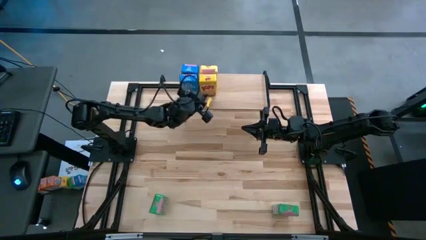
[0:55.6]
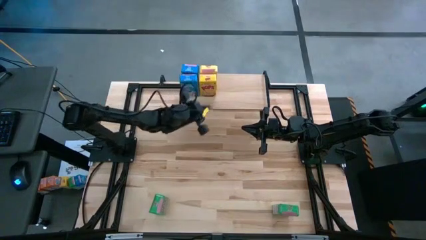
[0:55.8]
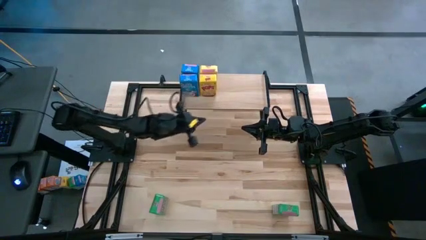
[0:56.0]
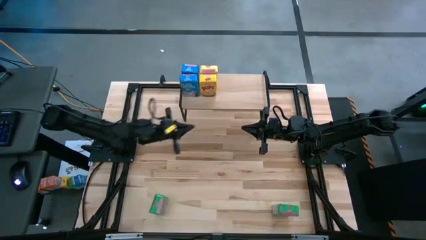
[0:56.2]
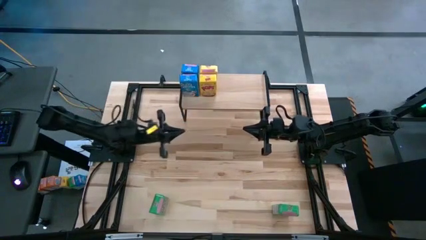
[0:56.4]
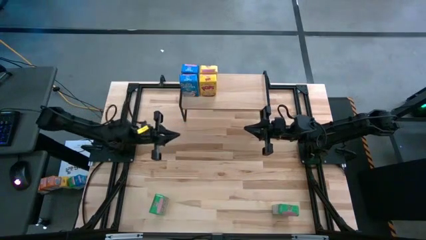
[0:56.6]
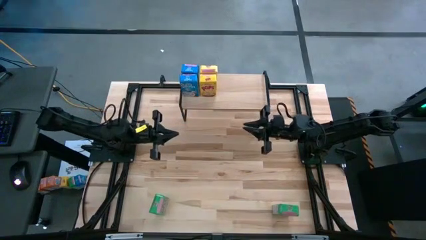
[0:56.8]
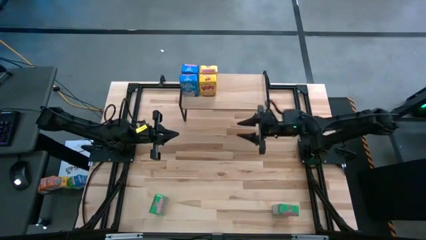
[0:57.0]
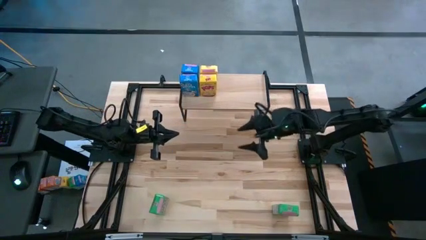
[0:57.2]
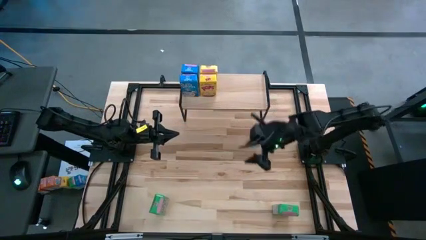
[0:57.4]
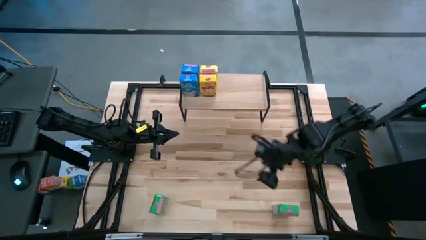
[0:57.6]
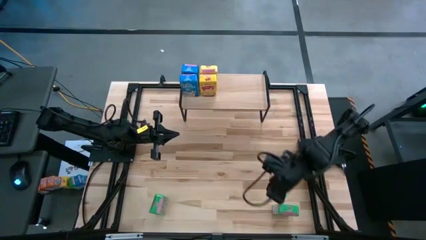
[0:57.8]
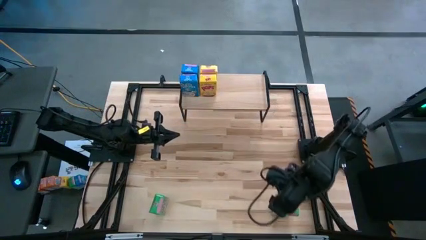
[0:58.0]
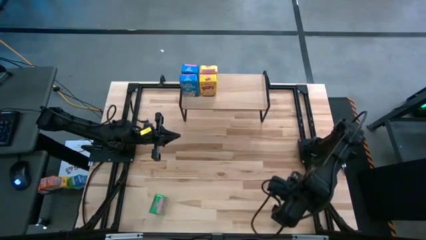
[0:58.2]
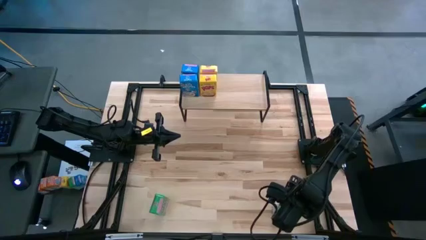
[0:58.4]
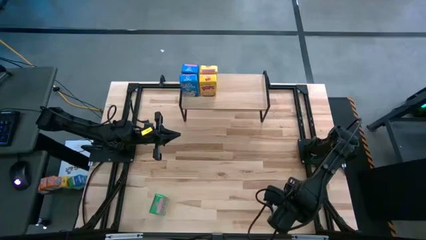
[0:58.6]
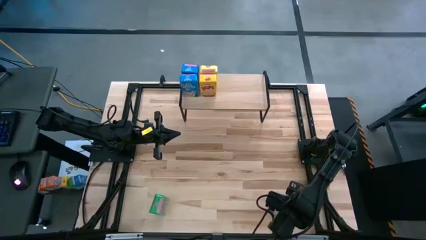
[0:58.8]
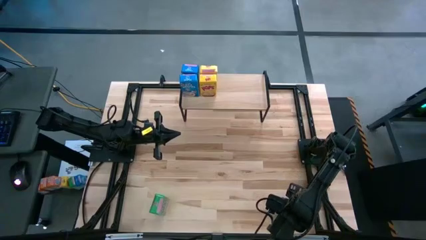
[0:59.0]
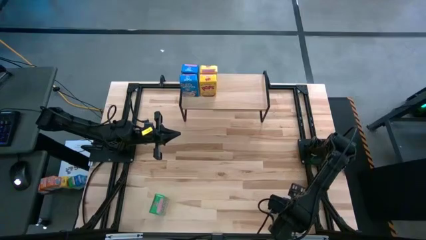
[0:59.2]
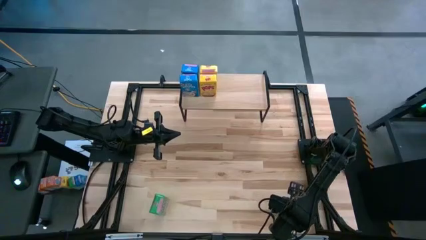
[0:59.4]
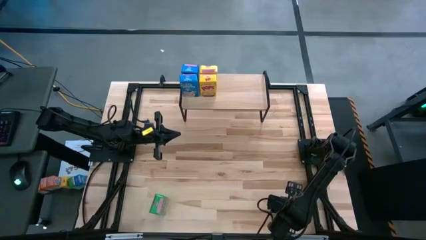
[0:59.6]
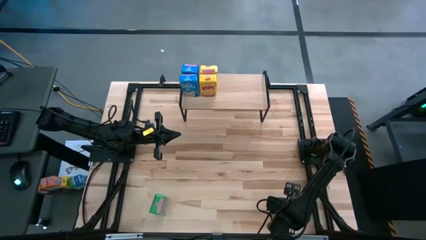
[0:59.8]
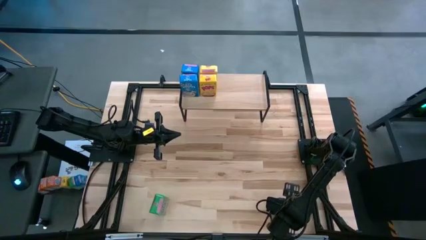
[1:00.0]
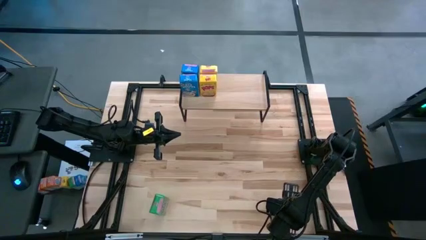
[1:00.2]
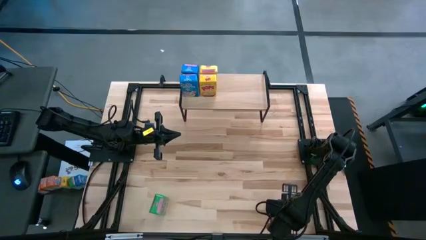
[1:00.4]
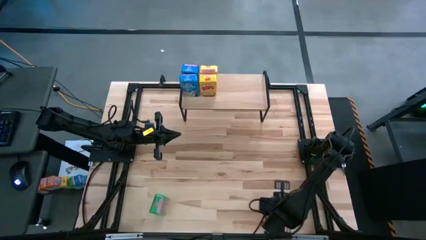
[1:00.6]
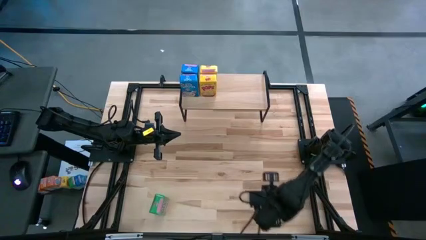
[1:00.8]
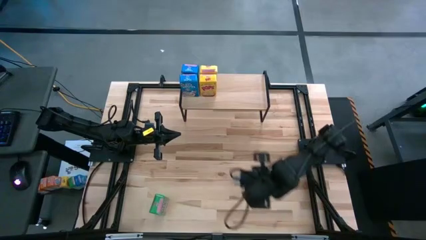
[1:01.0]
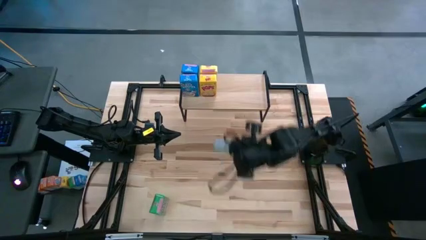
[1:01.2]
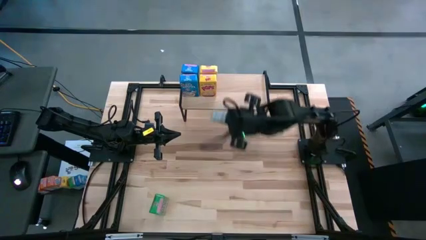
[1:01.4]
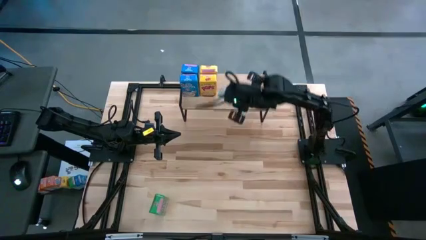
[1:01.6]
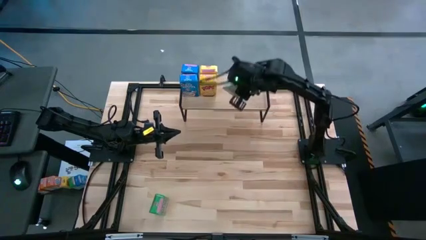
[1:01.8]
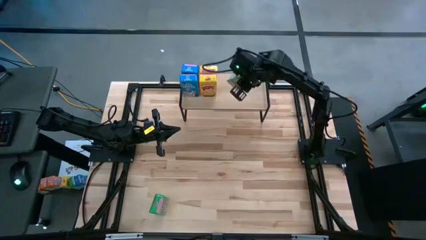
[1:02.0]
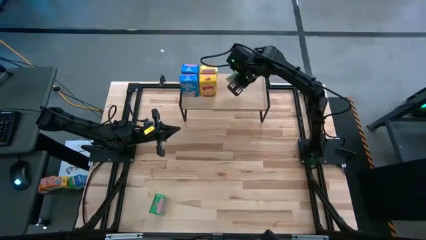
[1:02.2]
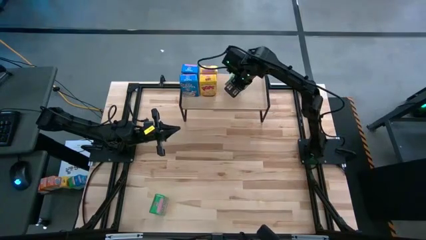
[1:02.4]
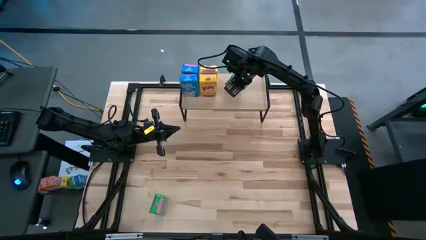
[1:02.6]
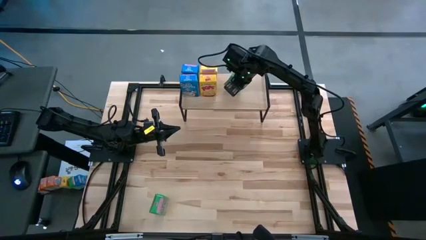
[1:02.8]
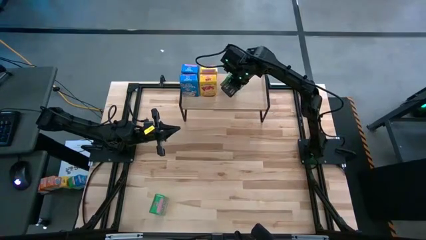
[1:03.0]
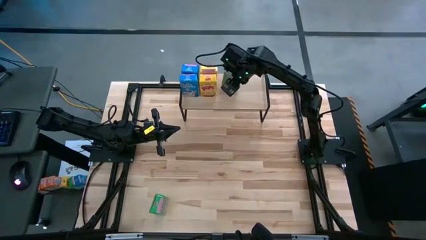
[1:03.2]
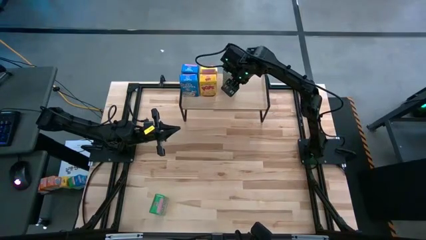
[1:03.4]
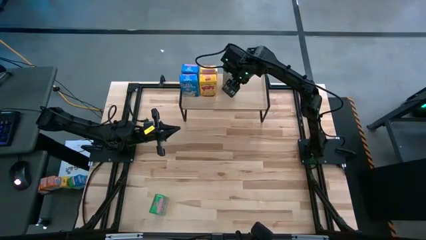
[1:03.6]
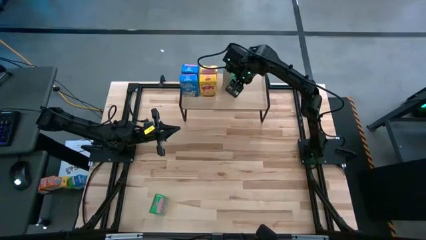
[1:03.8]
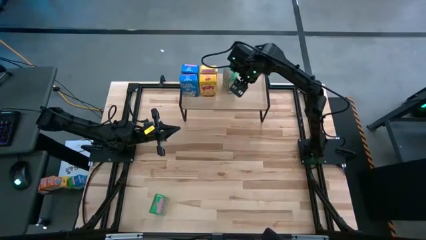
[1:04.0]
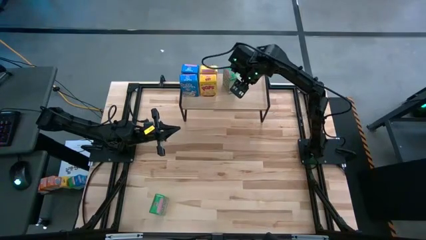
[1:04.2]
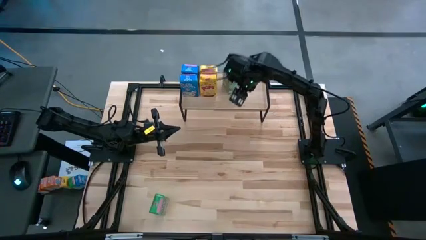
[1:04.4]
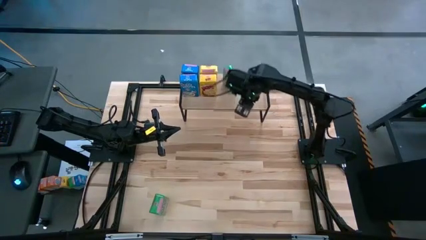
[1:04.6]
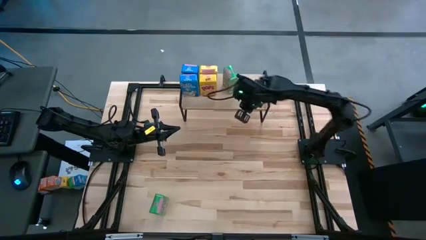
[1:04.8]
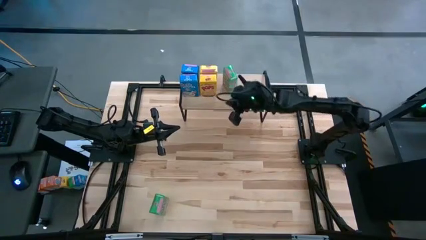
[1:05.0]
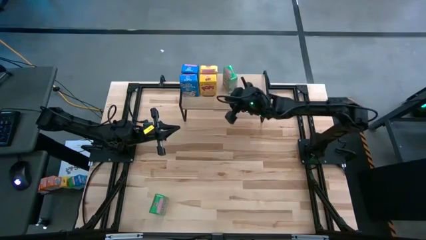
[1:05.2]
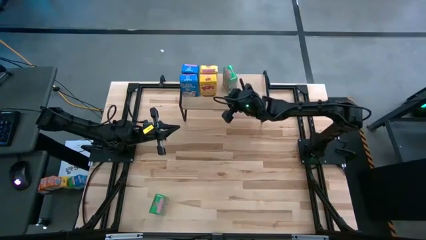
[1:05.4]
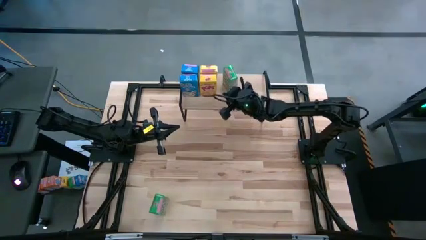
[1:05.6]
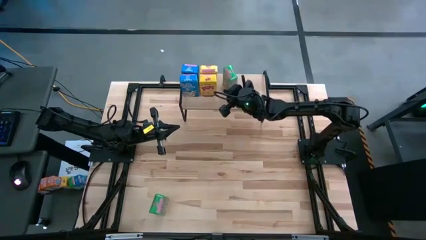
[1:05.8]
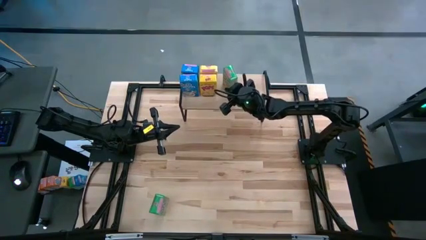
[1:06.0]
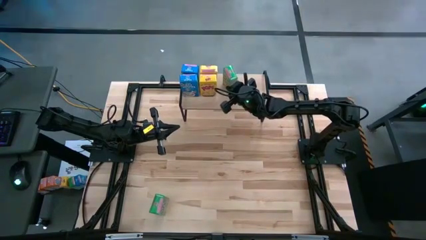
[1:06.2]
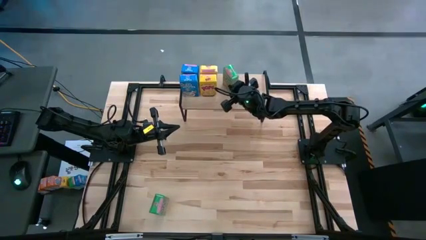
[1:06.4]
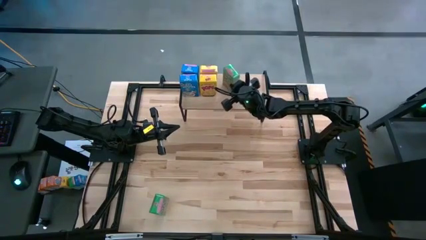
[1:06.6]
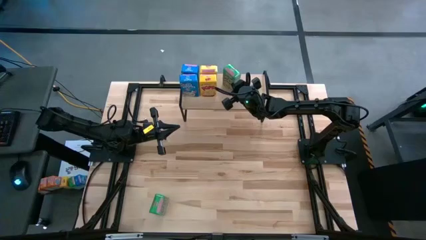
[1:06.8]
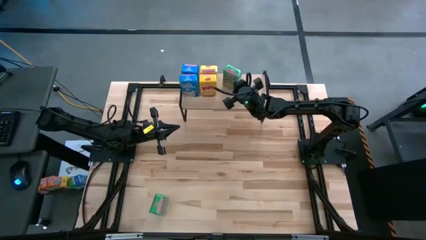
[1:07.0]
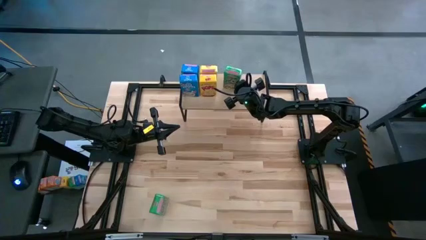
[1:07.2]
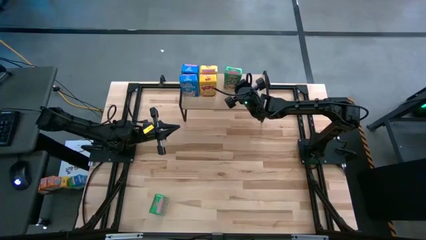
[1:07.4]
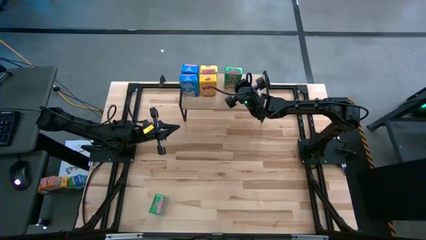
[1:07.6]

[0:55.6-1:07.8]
Task: Stack cereal on shelf
Put the right green cereal box on the shelf

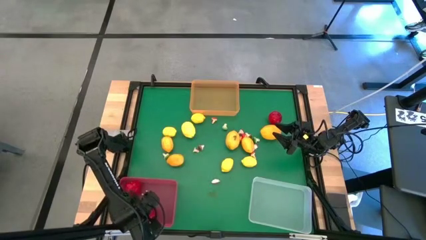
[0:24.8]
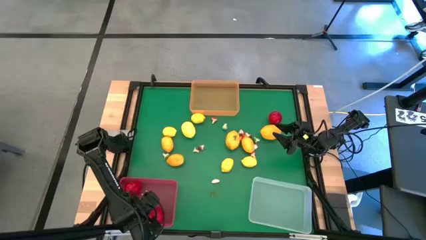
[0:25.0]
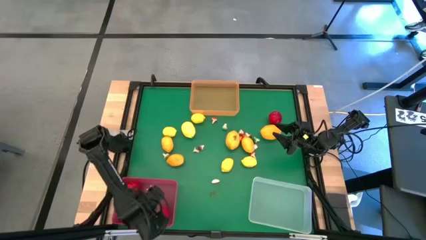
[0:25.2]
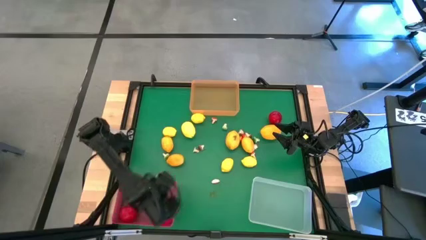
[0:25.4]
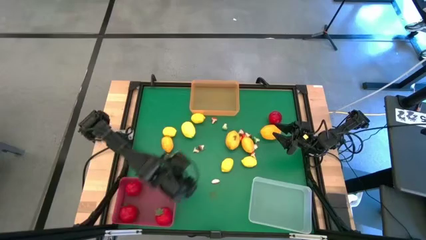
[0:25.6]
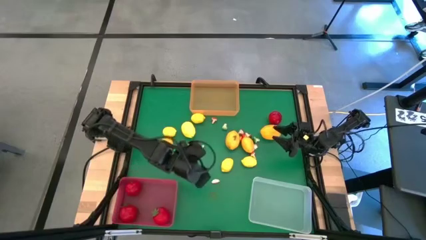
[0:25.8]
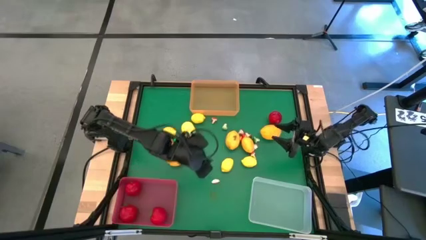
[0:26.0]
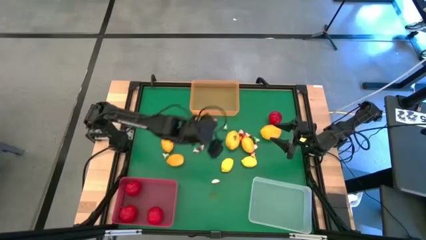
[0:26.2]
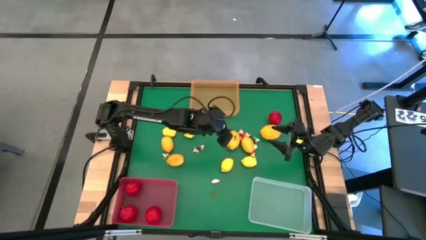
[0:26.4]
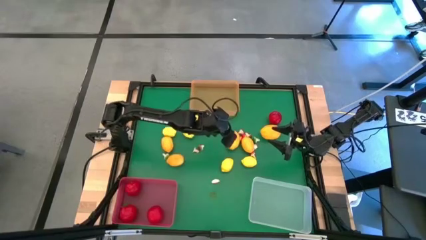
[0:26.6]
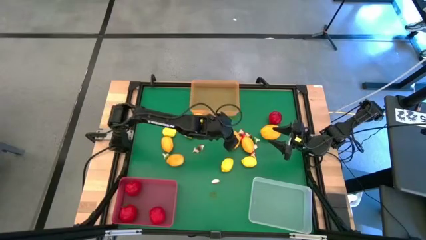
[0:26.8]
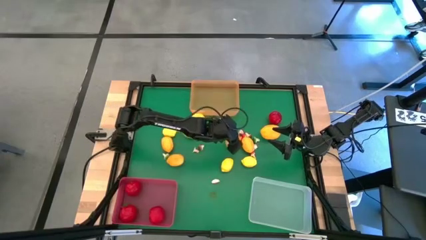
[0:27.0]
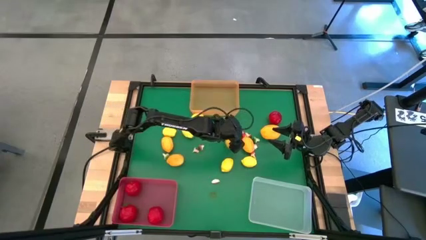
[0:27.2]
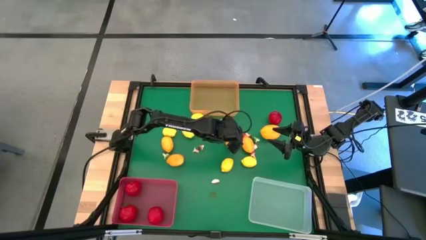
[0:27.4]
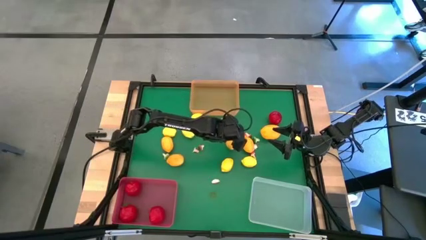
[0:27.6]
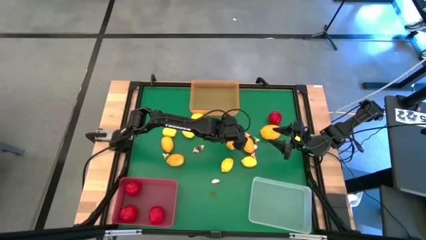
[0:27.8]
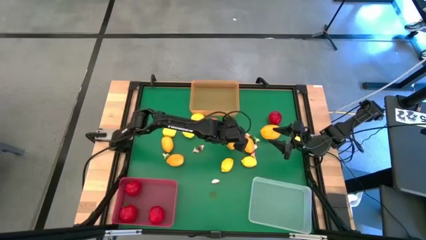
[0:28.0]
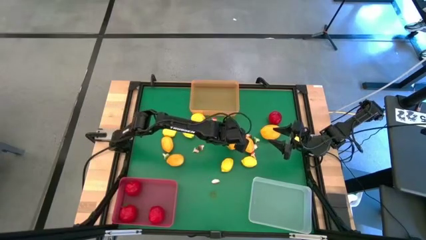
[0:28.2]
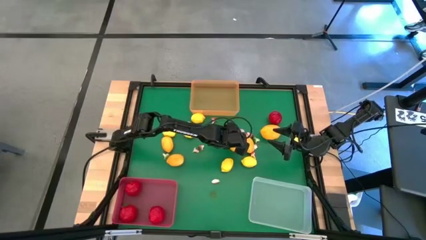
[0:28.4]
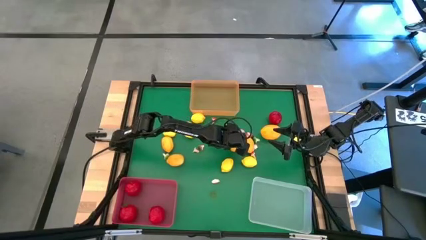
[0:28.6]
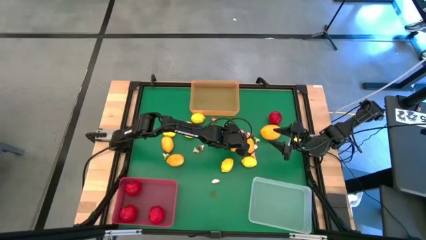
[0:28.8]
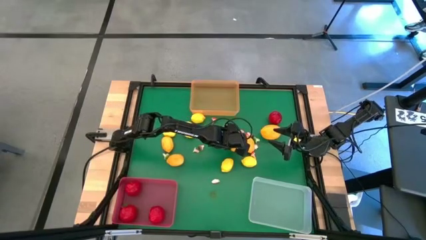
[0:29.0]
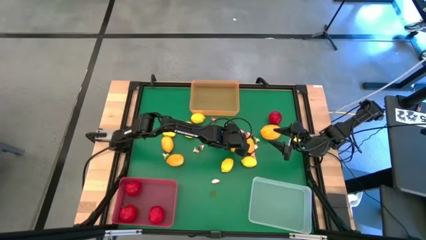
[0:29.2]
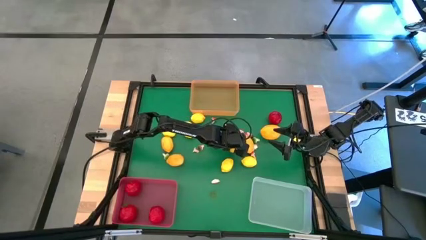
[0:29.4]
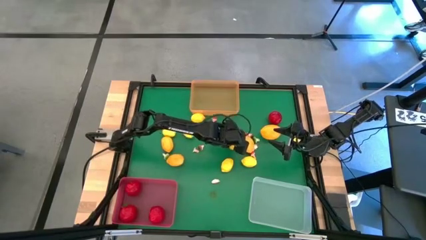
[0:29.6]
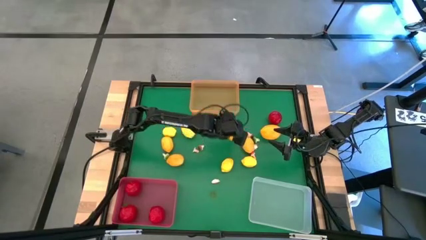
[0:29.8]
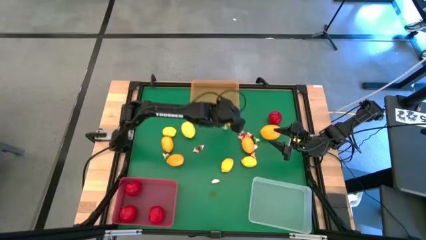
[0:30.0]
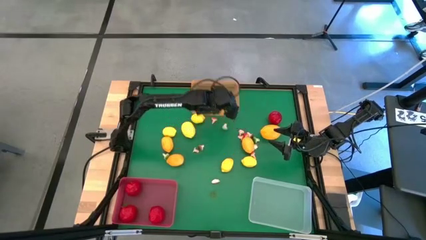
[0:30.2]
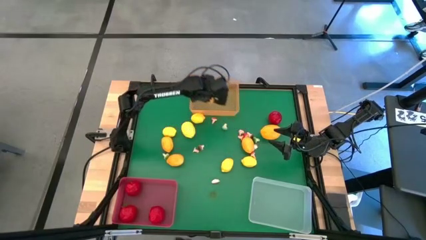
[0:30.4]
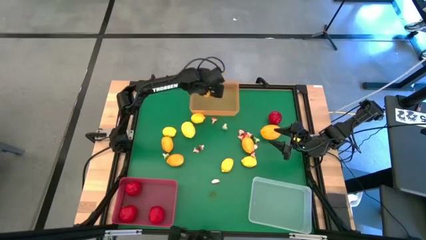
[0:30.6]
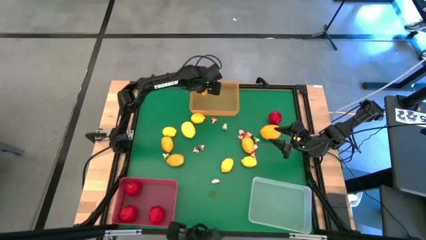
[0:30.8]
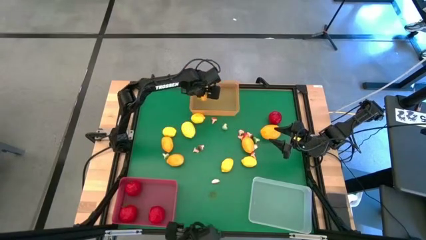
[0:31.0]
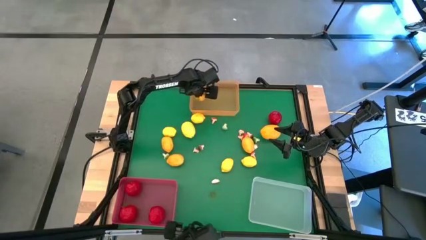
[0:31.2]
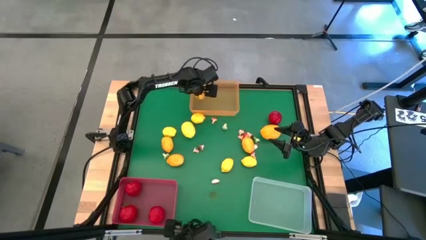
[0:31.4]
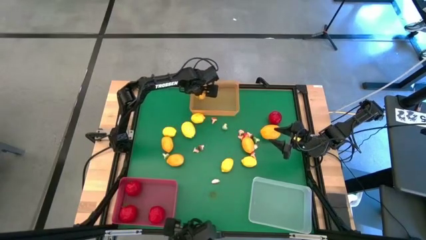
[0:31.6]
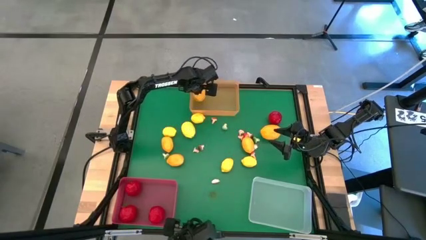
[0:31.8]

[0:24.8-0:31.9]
Task: Sort produce into baskets
Put the mango into the orange bin
